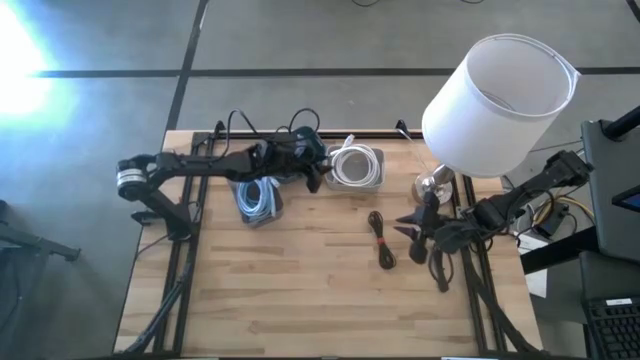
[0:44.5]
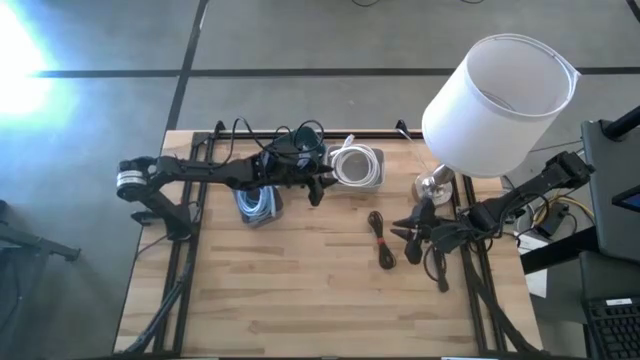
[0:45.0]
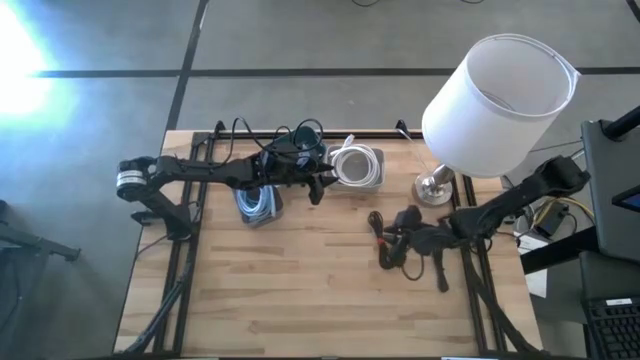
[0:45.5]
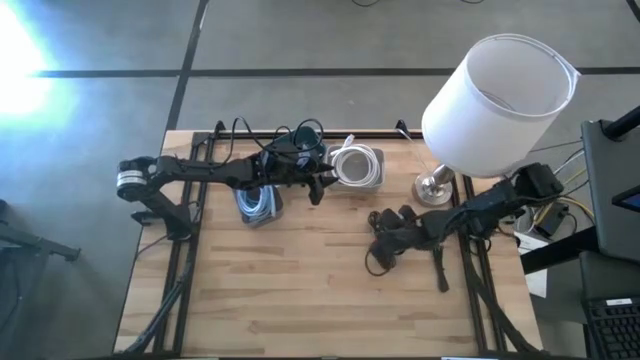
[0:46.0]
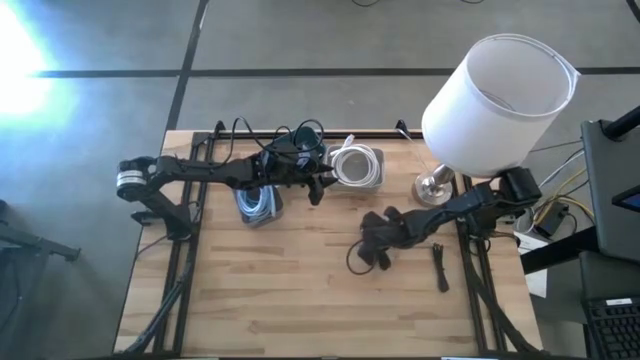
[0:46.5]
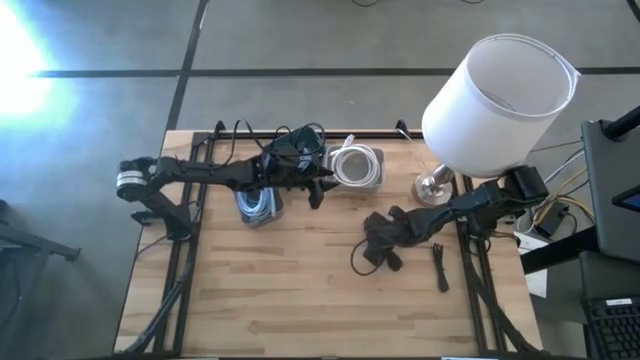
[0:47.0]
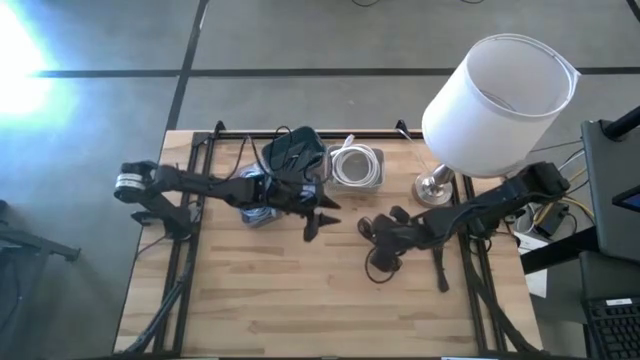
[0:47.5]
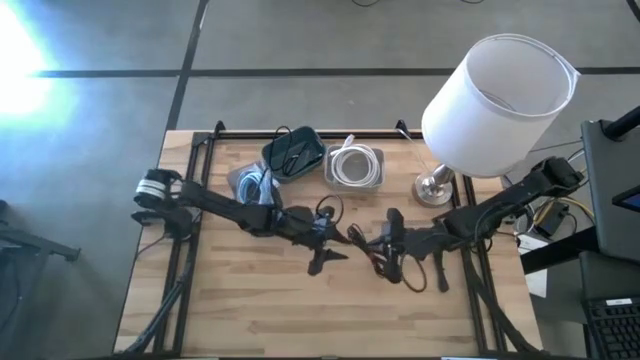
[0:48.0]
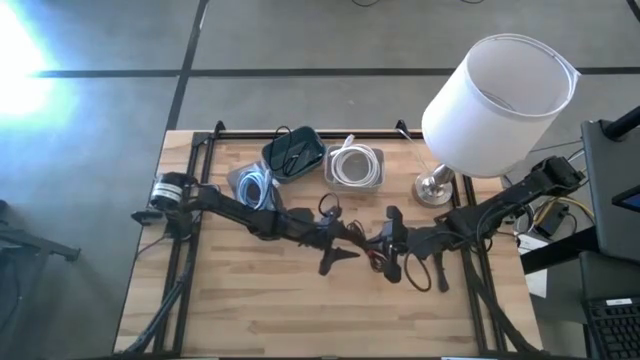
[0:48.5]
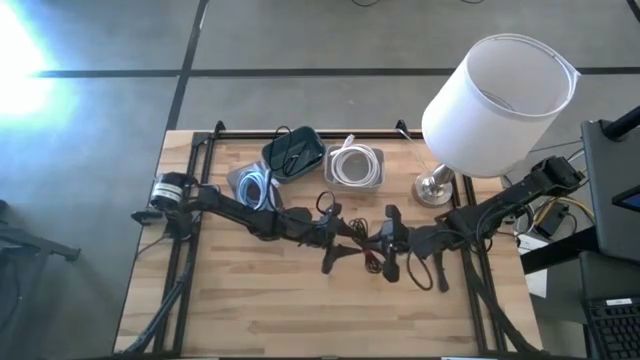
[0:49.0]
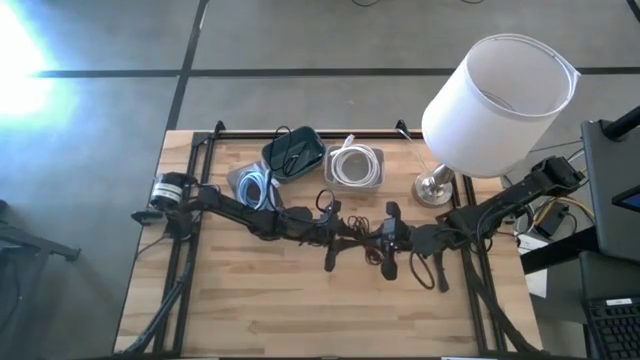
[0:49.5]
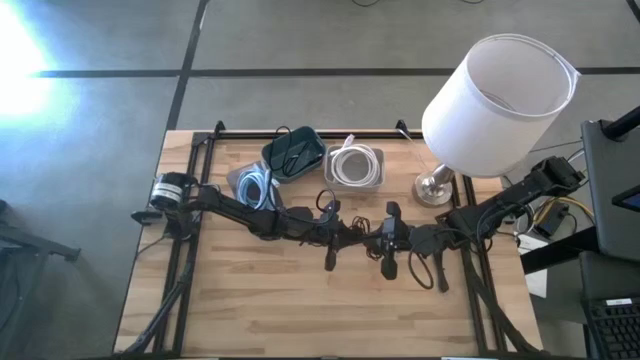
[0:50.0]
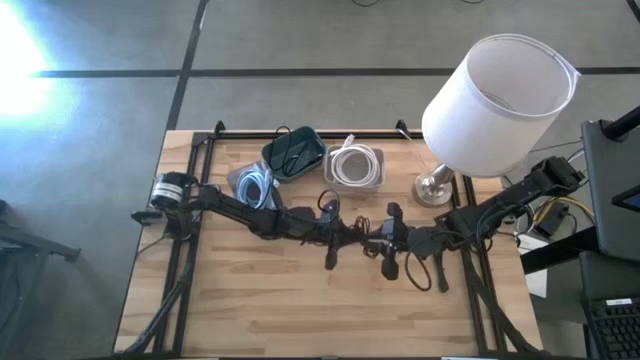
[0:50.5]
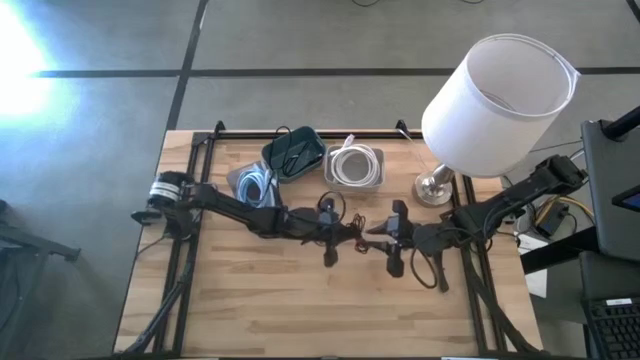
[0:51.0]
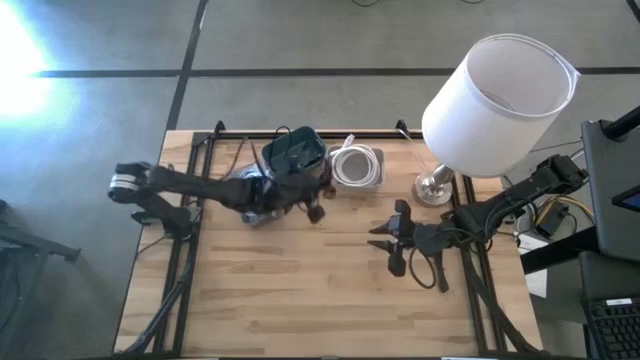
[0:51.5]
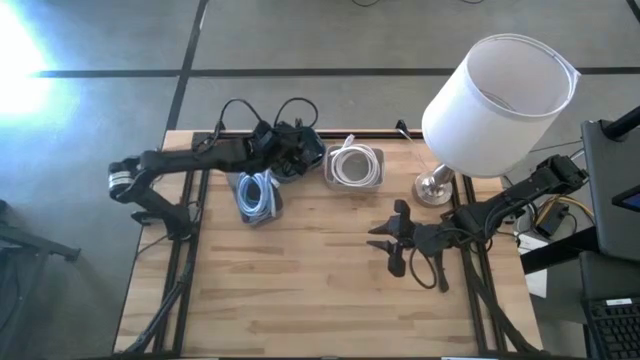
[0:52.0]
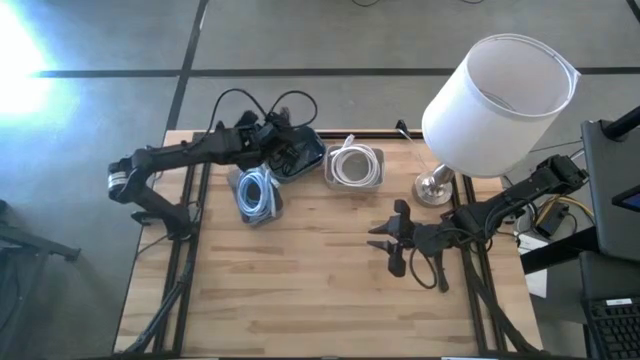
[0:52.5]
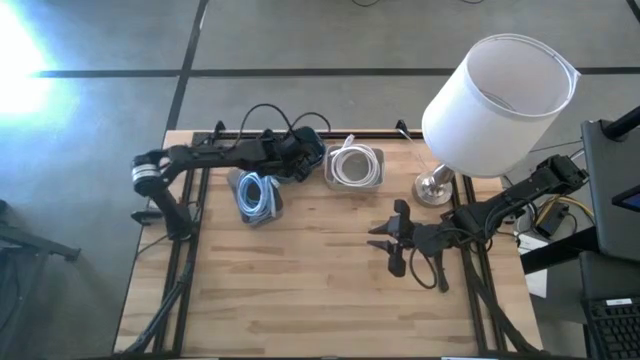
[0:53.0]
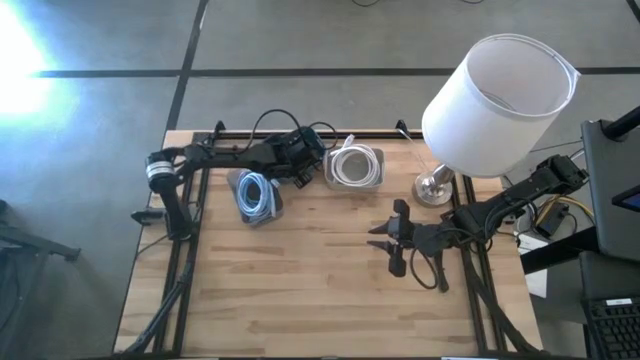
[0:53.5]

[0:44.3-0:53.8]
Task: Pick & Place USB Port
Put the left black charger cable into the dark green bin

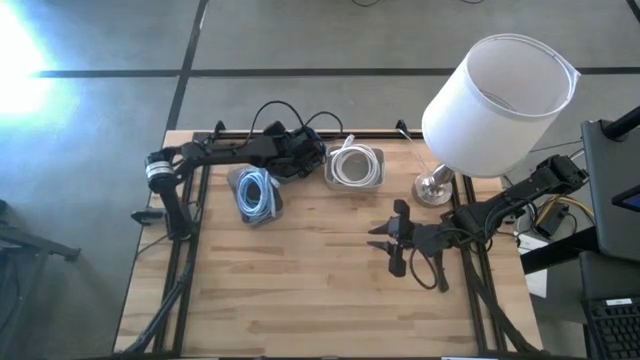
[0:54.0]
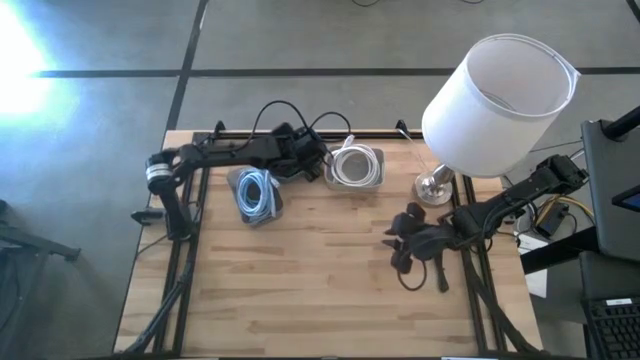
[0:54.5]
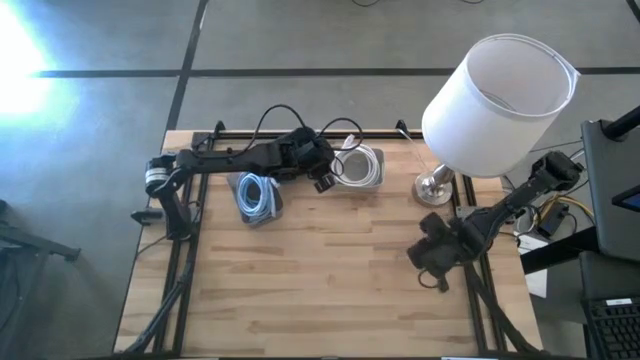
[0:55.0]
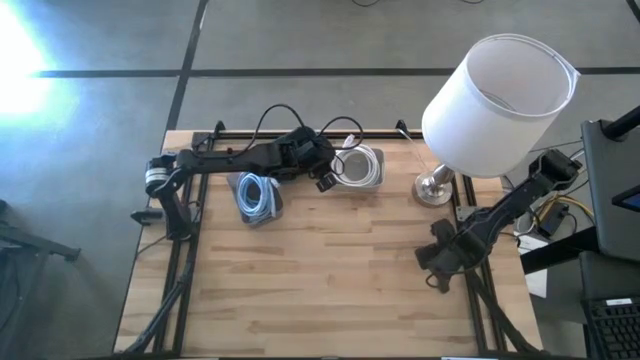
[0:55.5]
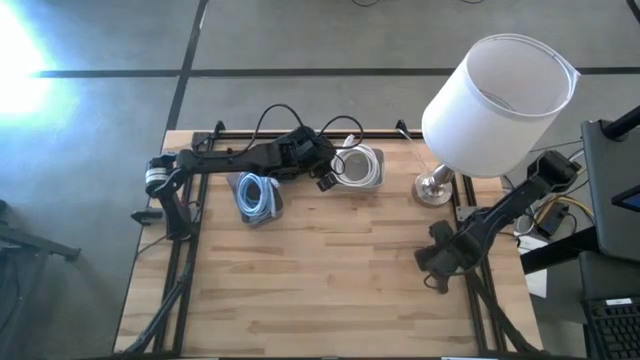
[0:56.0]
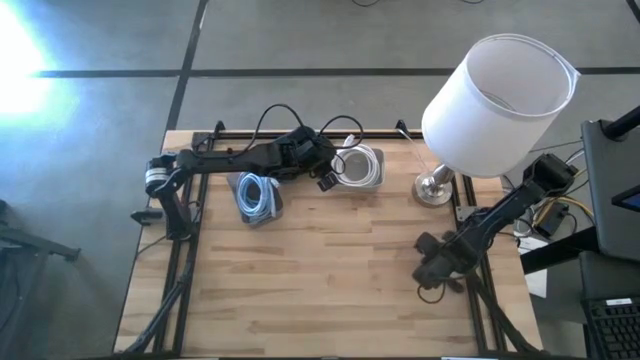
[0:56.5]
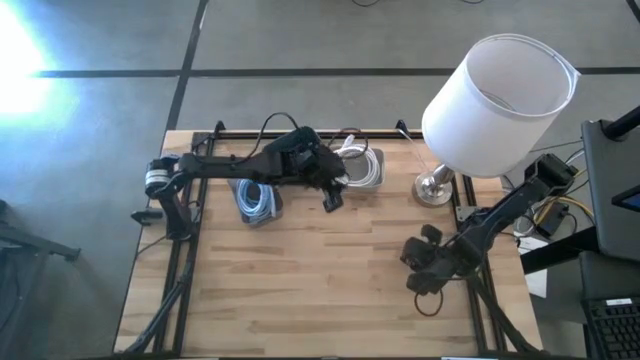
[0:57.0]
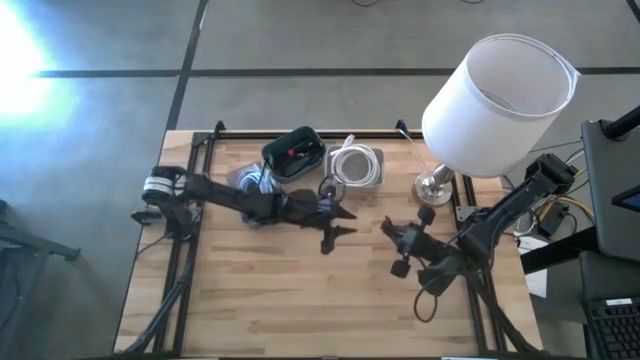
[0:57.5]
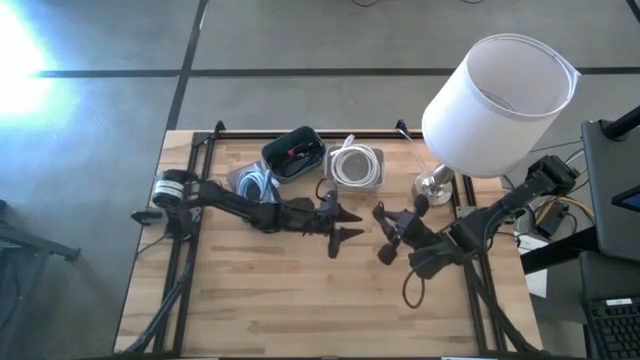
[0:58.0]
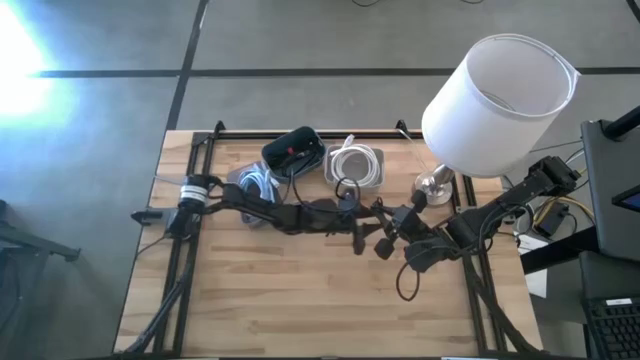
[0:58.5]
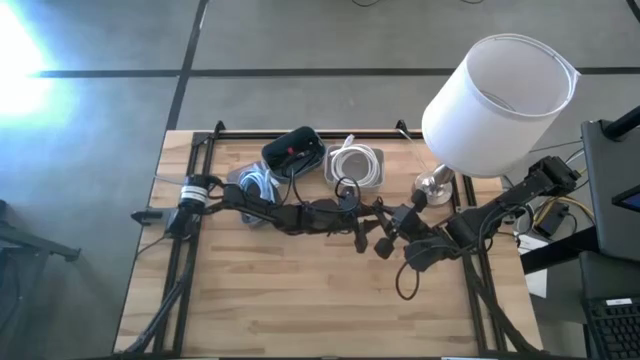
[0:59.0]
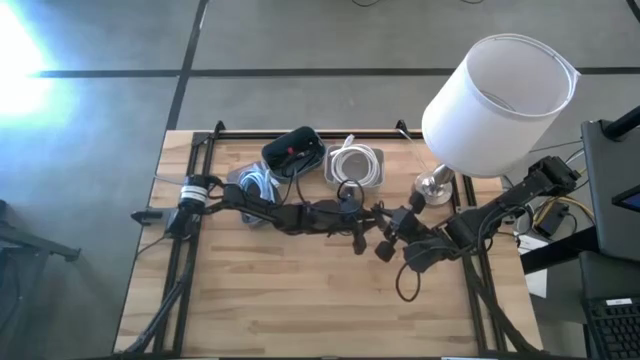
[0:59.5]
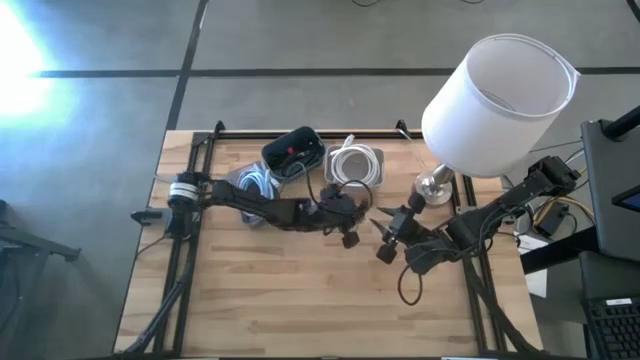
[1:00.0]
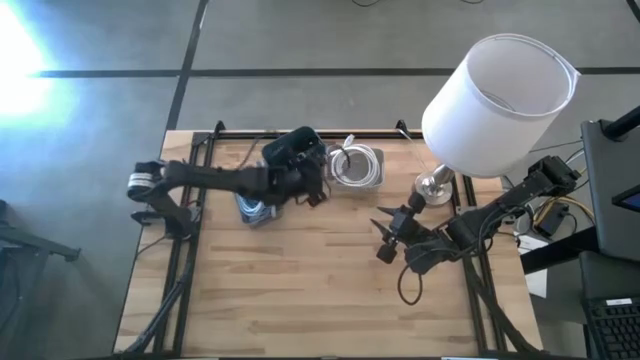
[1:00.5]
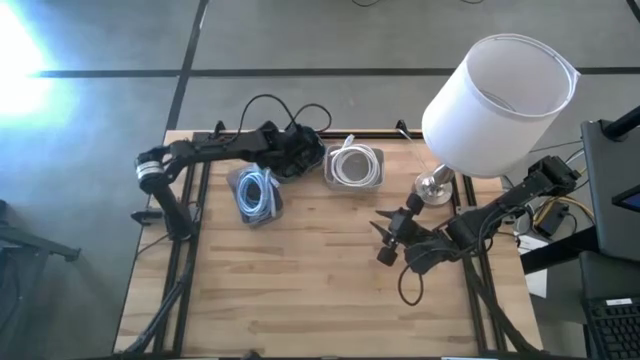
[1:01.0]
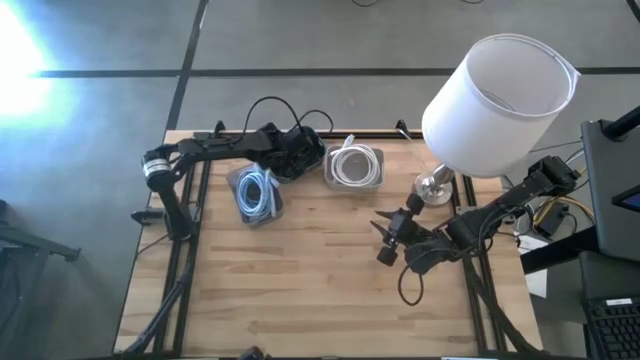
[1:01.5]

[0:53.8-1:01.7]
Put the black charger cable into the dark green bin

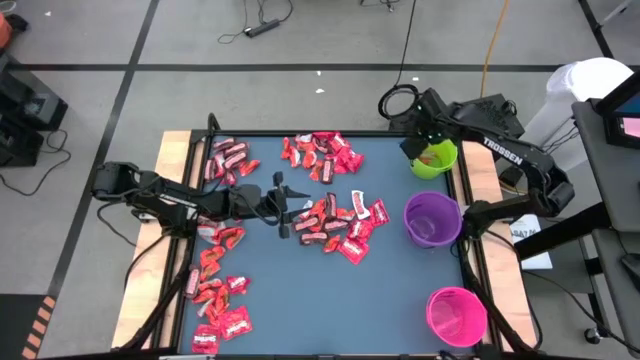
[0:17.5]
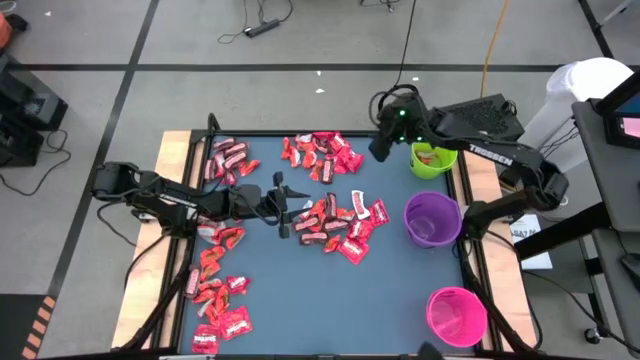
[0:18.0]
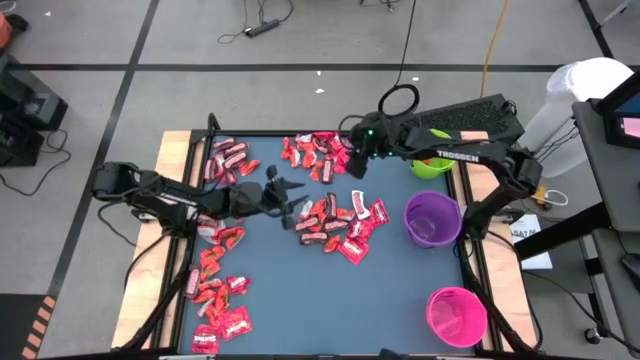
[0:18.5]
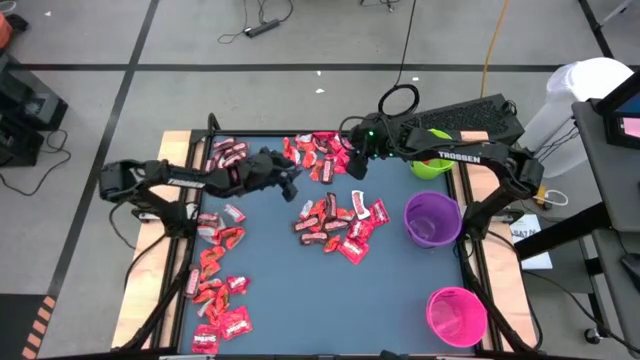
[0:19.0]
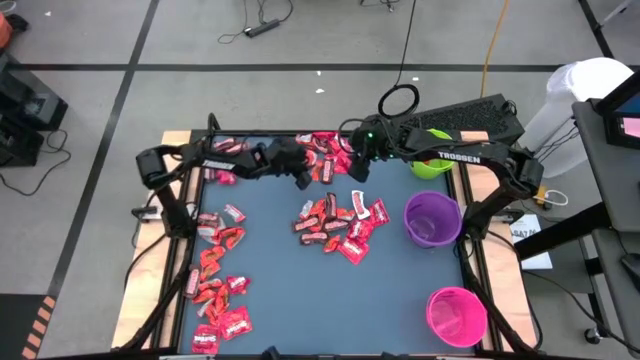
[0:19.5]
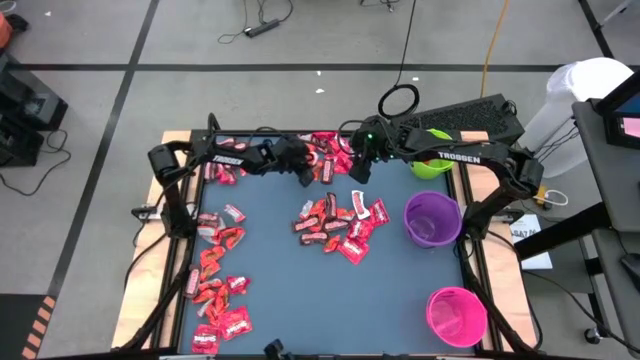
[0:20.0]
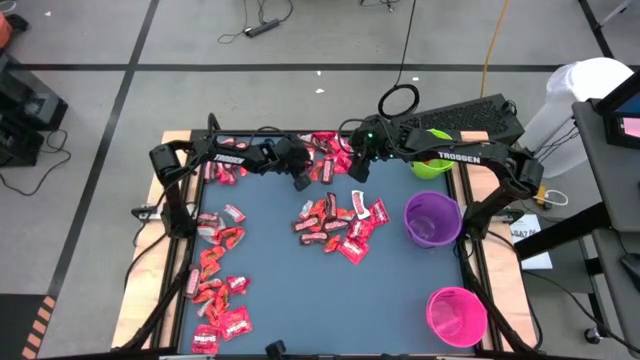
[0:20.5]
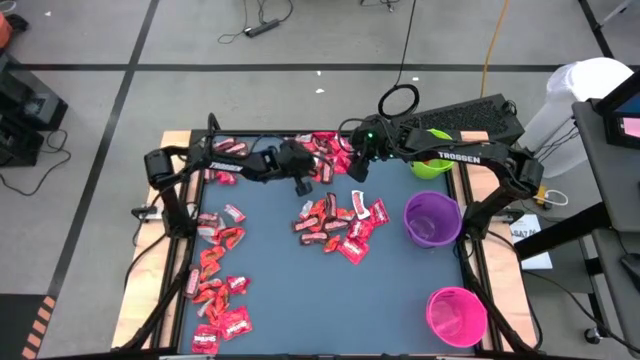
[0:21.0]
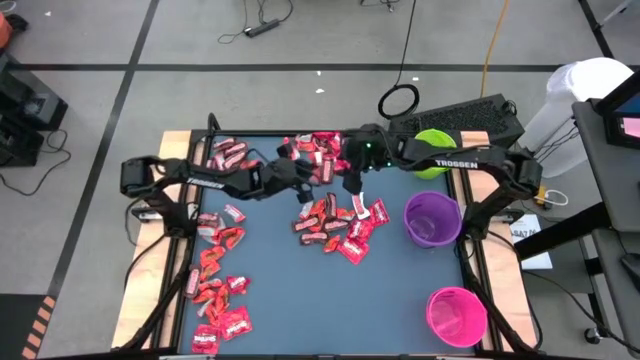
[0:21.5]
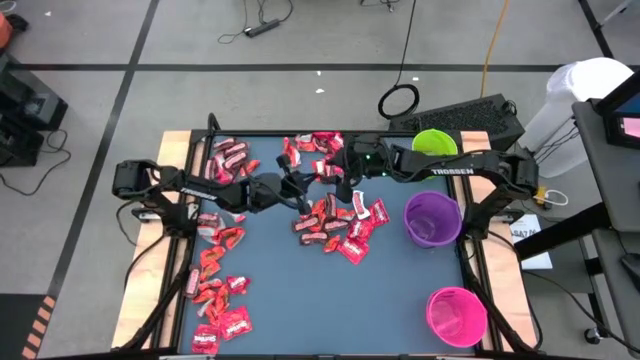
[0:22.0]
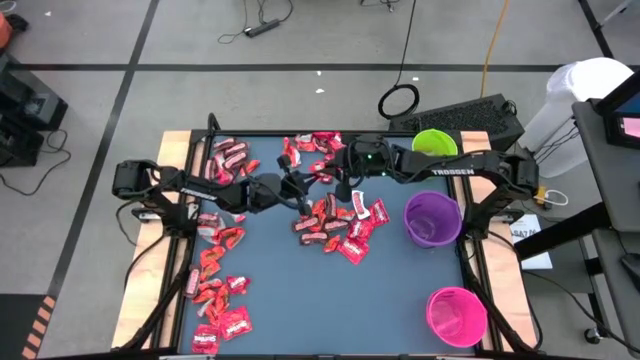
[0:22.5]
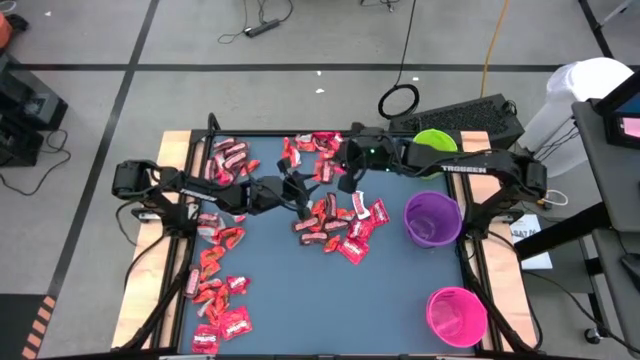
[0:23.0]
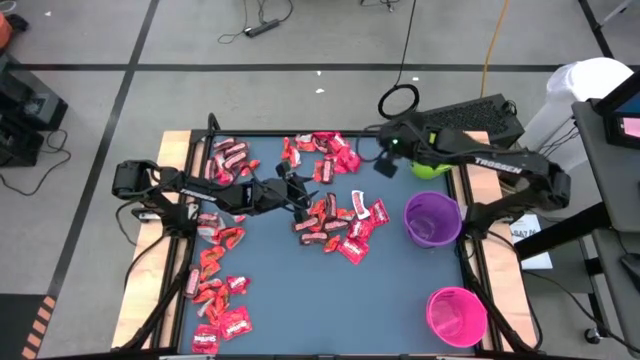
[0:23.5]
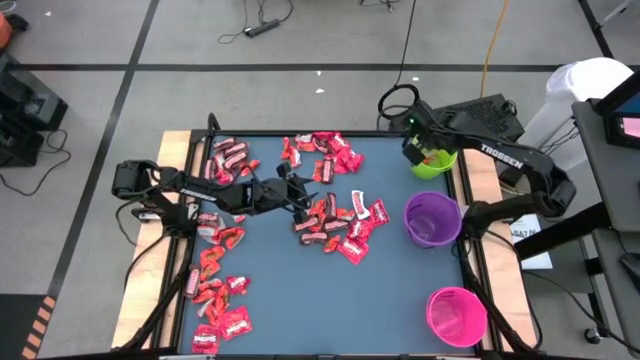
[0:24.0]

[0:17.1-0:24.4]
Task: Organize candy in baskets
Put the orange chocolate bar into the green bucket
